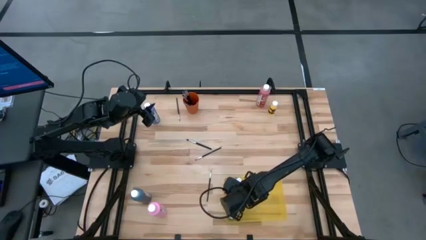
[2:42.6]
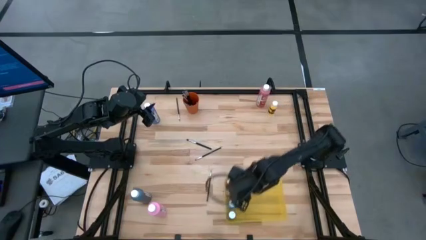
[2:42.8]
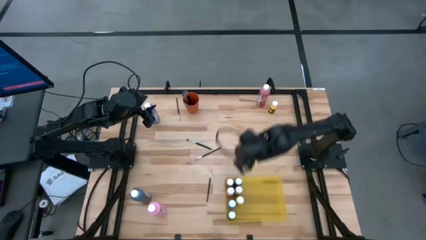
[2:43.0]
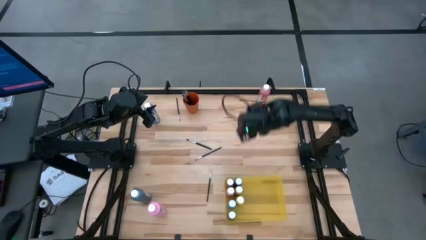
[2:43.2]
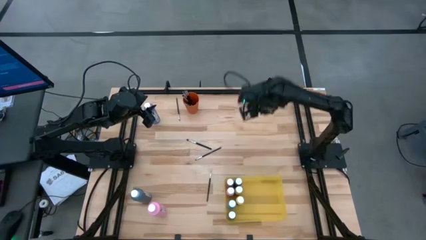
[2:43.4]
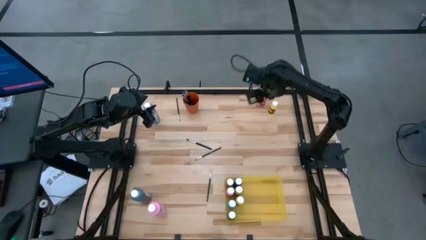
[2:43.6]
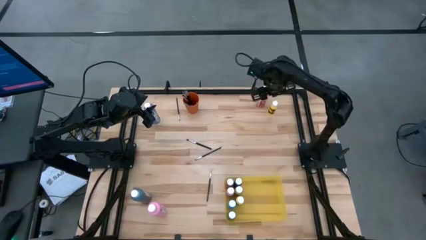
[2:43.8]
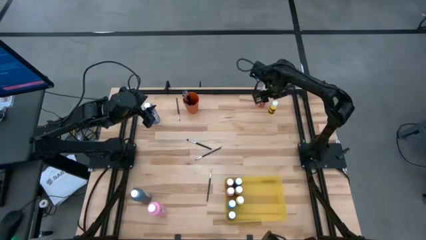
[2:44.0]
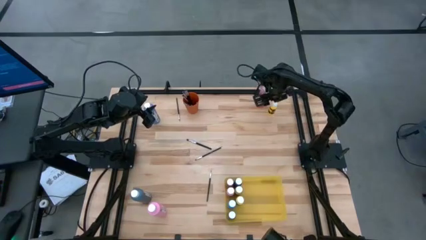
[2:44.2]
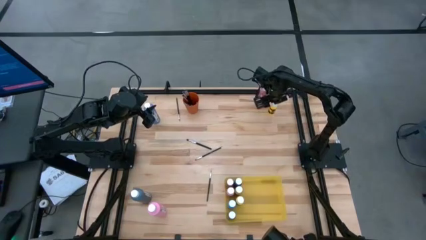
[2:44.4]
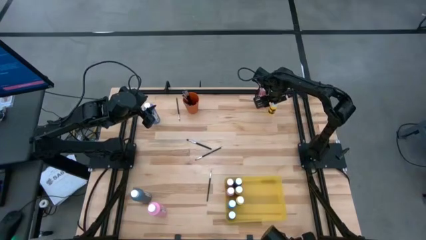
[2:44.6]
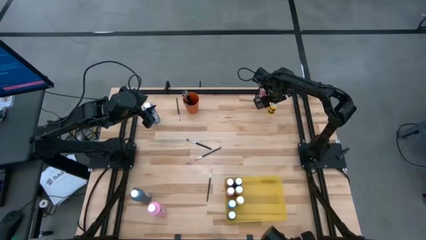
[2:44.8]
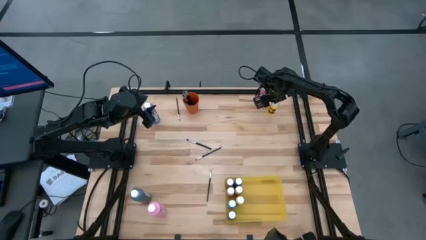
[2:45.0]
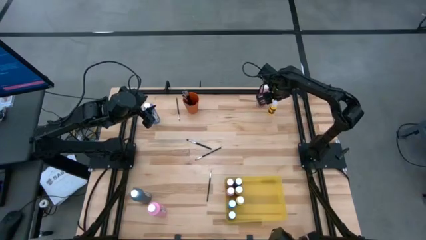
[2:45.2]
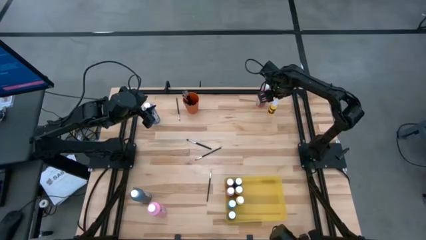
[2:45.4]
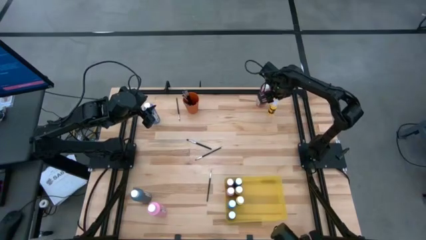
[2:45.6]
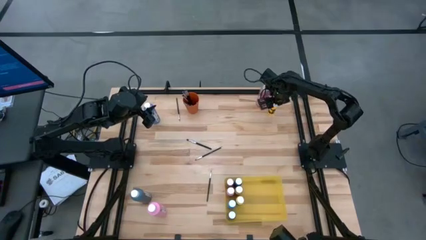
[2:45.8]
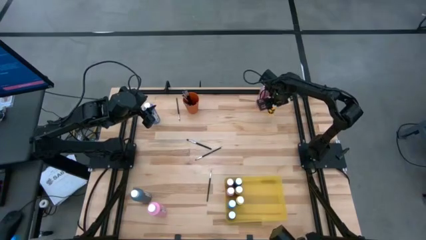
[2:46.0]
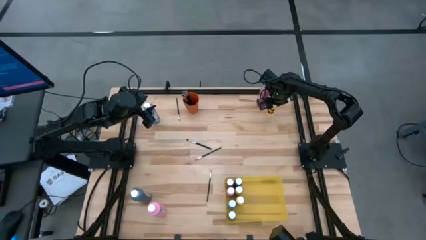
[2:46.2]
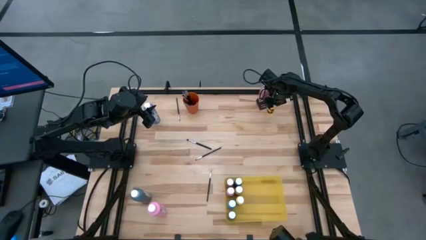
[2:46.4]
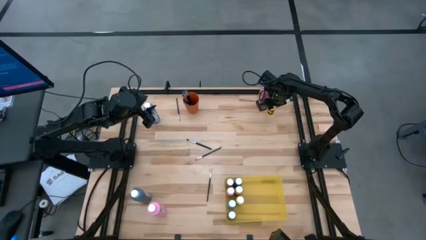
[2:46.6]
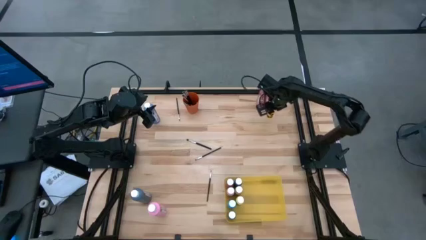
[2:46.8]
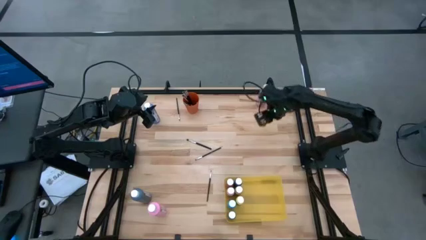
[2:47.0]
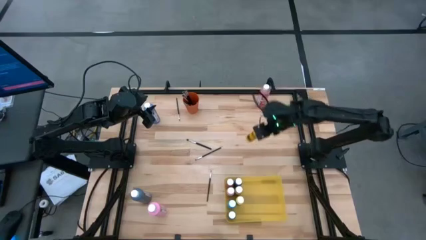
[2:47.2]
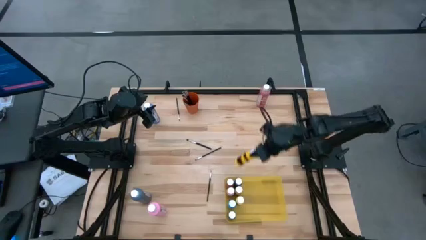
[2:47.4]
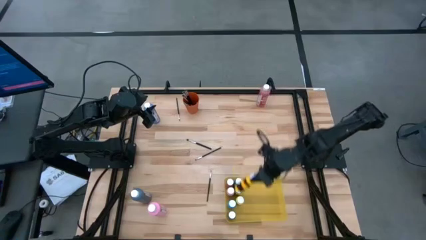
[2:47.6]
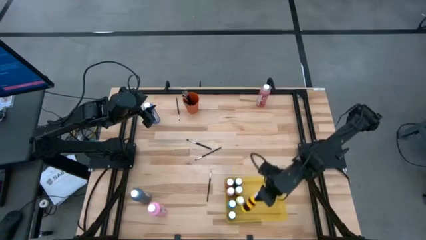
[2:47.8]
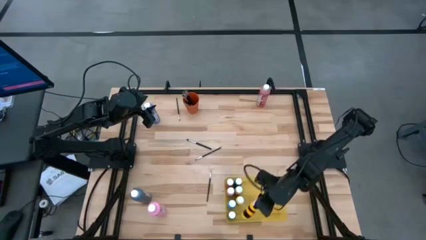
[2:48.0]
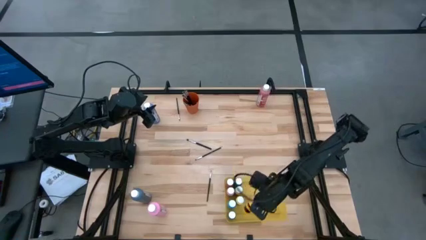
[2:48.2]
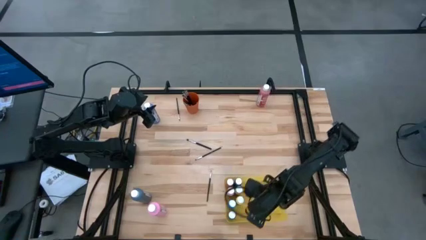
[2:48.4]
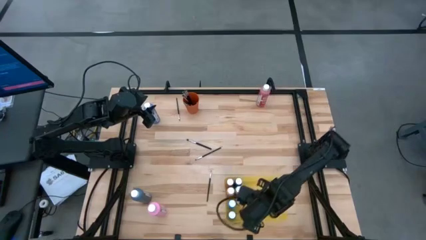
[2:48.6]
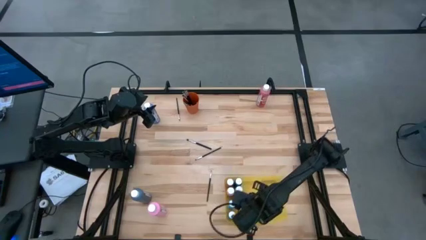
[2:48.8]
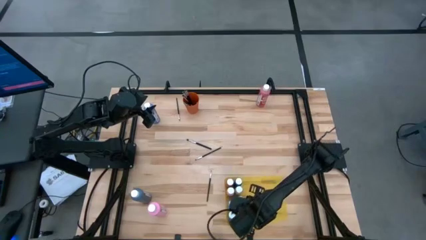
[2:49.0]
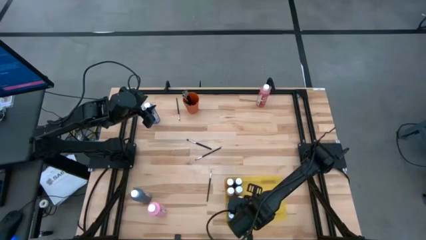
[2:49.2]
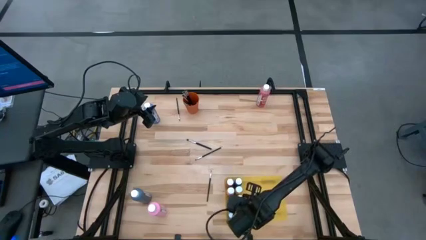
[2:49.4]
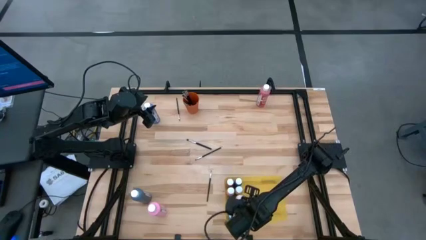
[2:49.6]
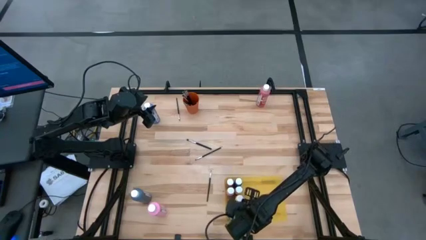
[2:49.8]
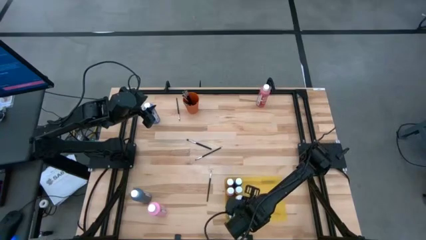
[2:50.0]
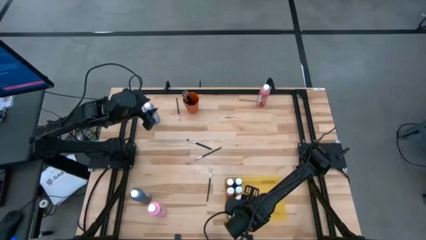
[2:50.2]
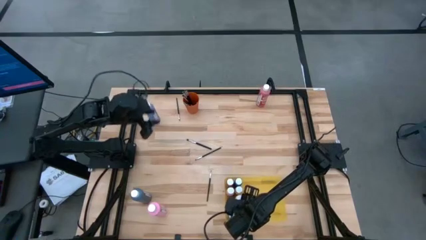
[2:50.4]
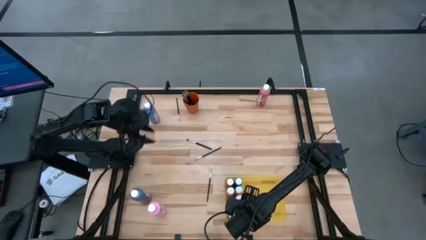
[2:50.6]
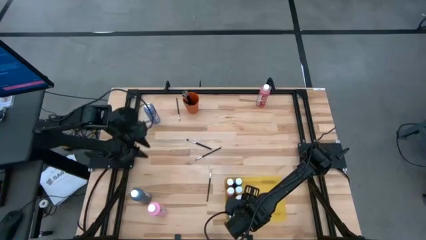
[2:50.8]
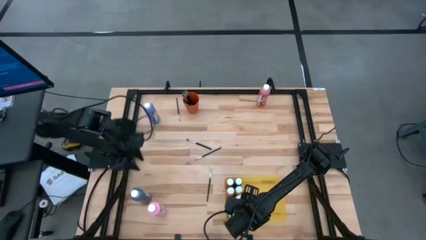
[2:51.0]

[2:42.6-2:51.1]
Task: Pick & Place Paint Supplies
Put the yellow paint bottle into the yellow bin

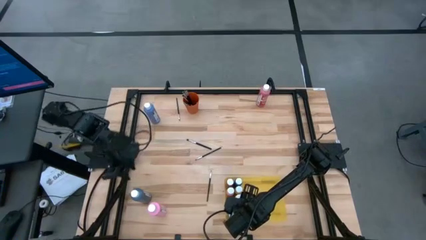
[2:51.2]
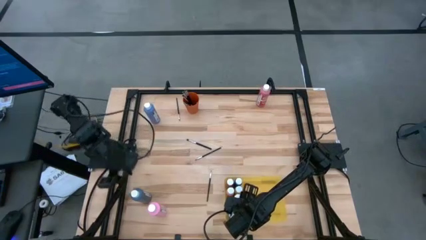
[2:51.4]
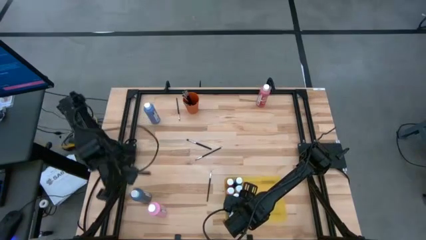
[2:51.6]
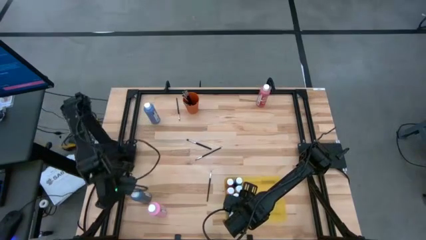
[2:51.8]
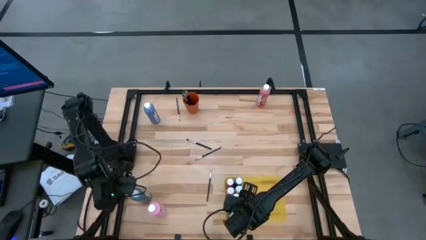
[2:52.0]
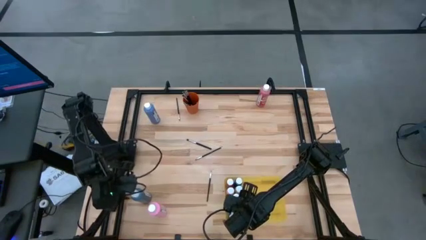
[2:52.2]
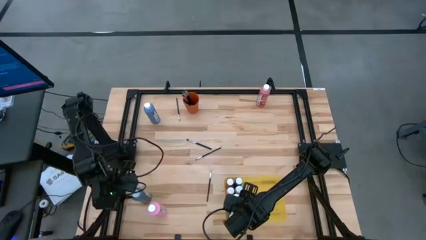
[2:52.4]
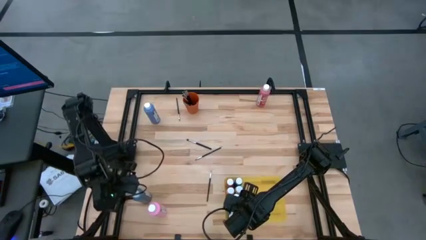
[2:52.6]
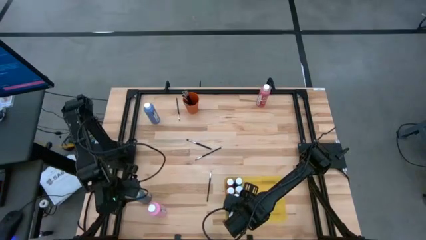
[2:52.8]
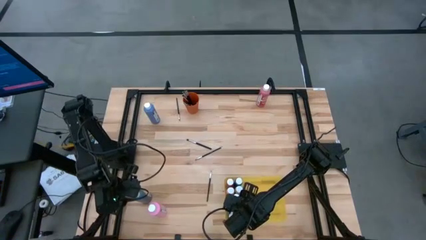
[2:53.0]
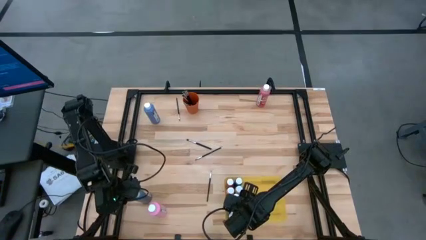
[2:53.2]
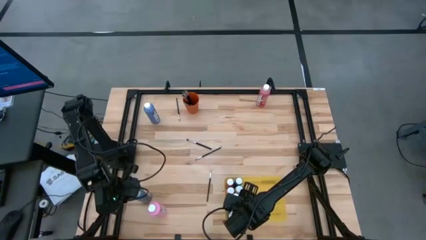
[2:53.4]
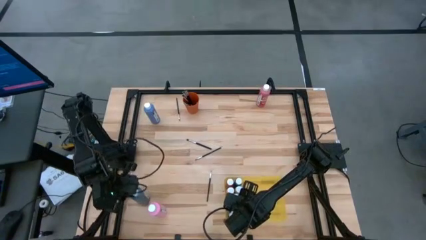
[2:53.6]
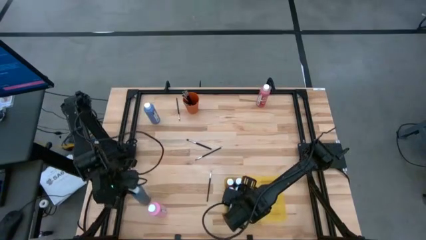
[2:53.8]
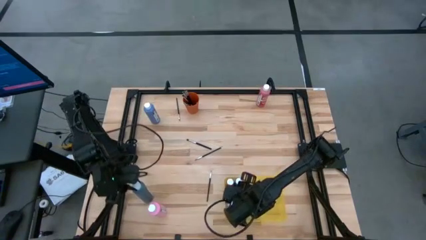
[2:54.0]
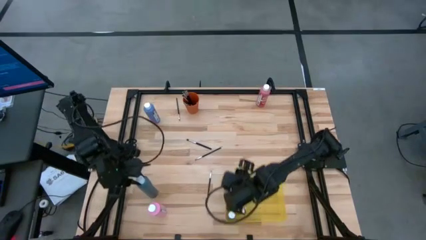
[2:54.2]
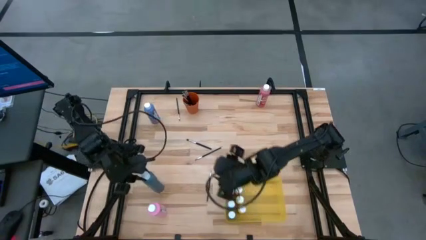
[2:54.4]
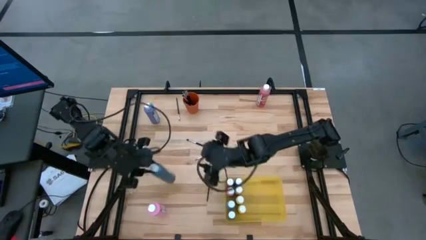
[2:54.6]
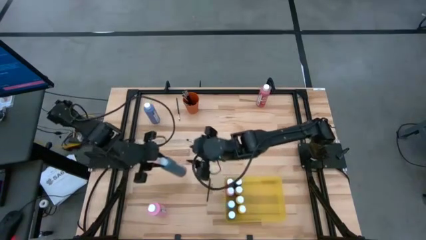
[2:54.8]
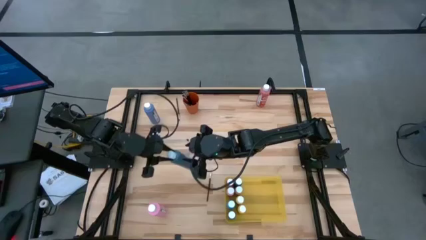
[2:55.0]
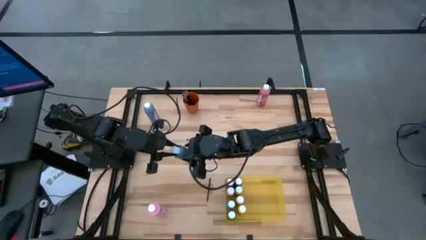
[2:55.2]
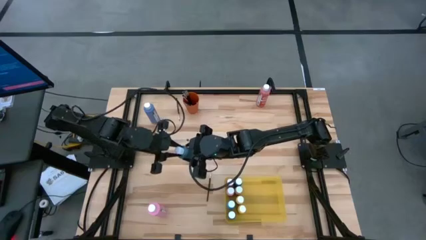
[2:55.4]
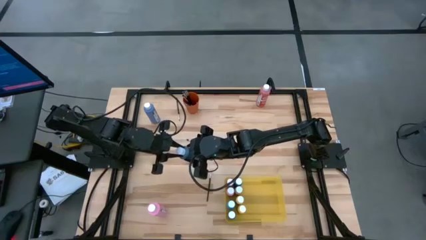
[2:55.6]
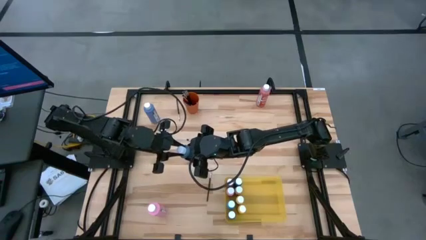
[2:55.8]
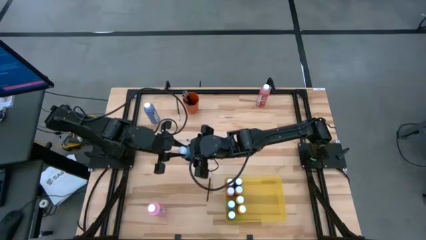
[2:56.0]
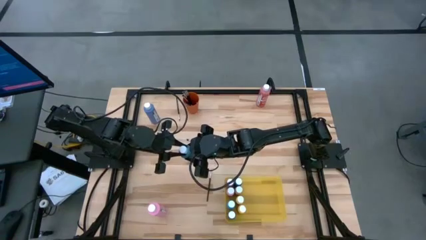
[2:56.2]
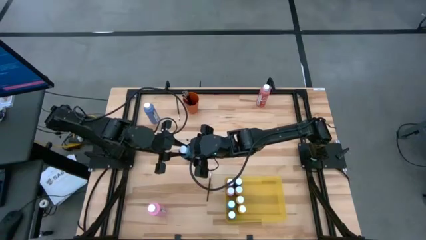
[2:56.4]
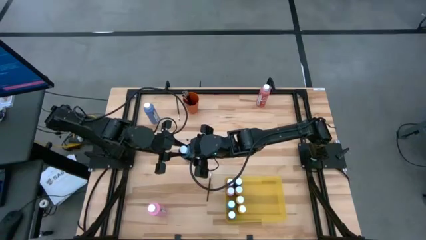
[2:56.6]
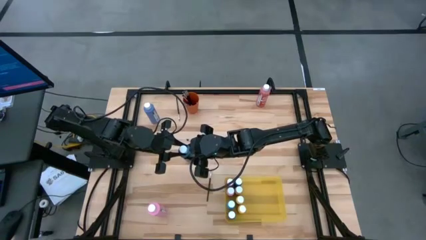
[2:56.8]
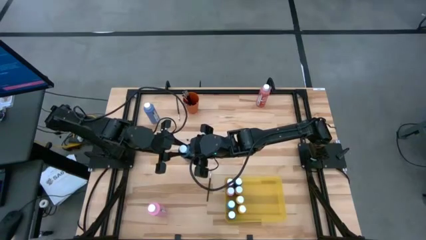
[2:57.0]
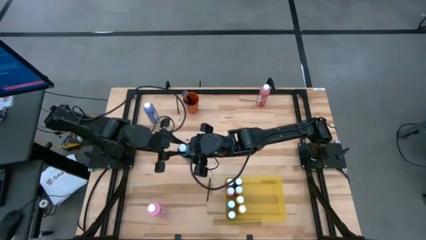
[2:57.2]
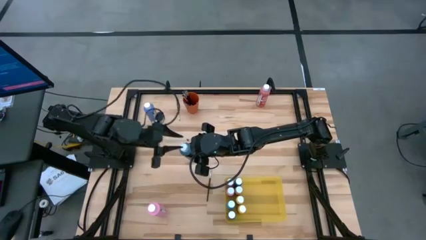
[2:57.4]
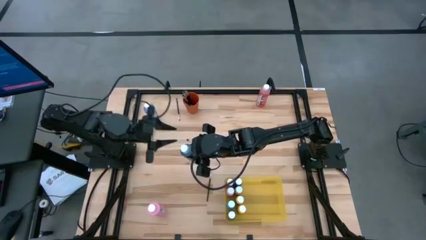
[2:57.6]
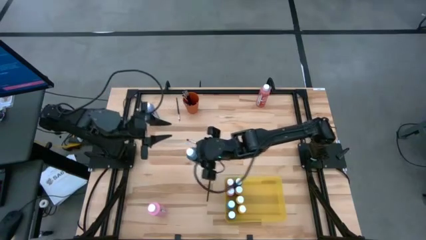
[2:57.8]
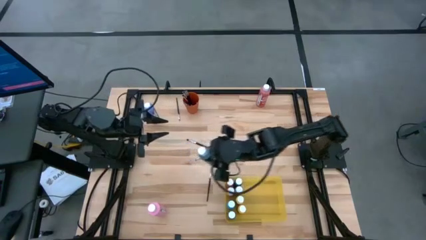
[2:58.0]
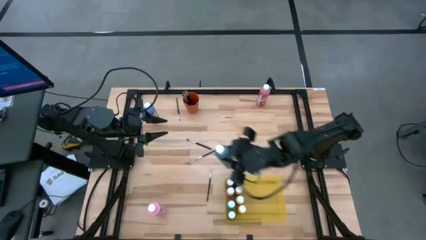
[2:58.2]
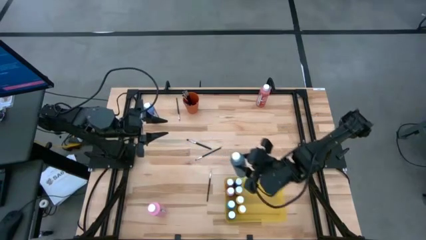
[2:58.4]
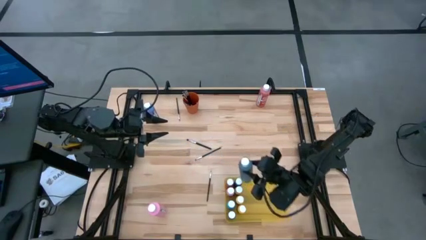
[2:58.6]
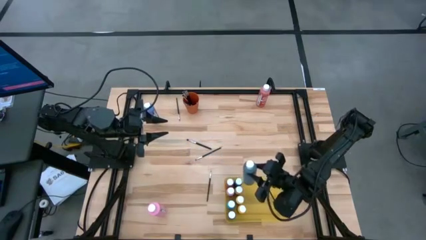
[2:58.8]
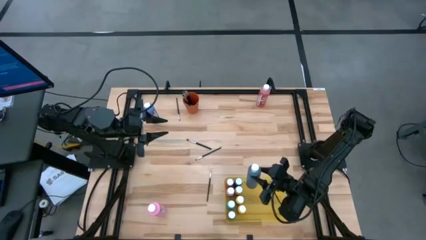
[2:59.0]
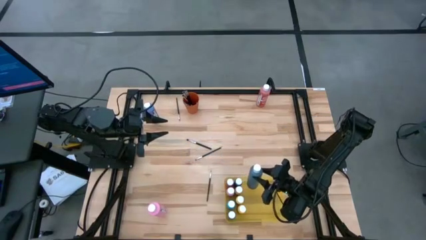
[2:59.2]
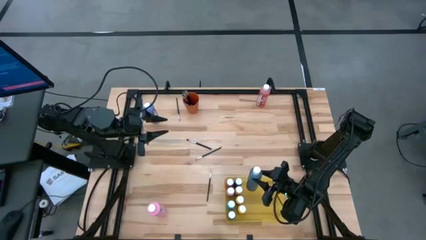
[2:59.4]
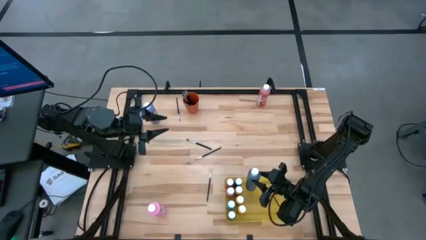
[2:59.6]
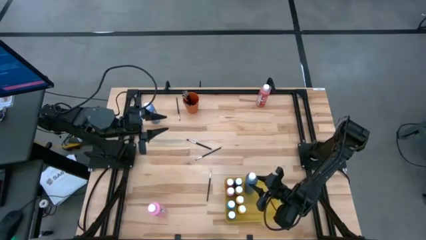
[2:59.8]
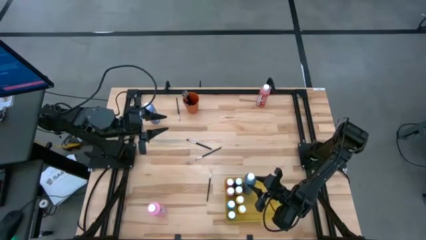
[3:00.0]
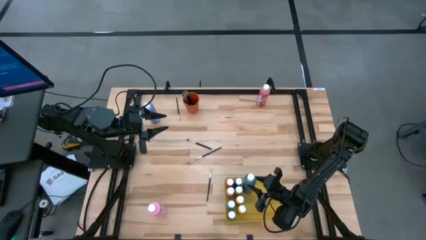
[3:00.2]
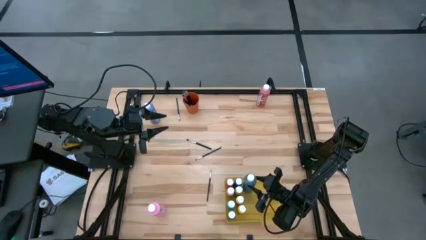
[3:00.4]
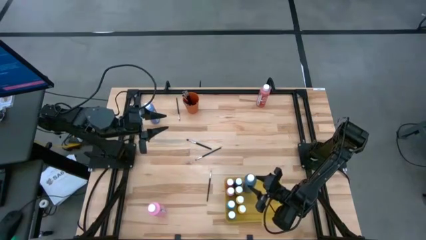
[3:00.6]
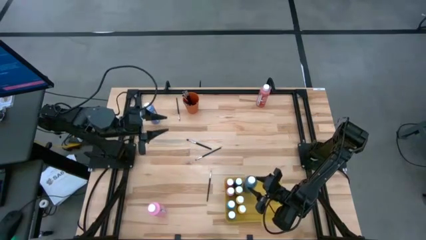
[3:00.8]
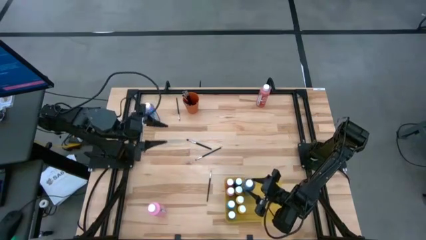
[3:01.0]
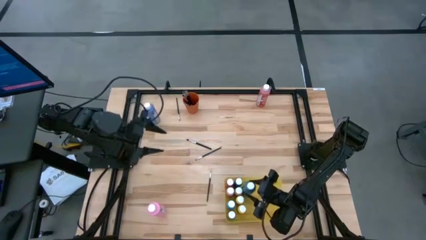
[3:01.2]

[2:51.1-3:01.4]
Put the black paint bottle into the yellow bin
